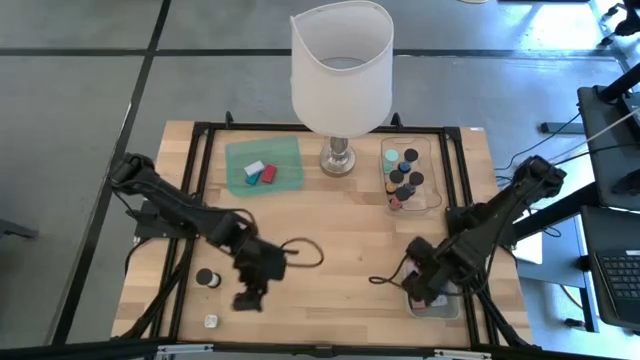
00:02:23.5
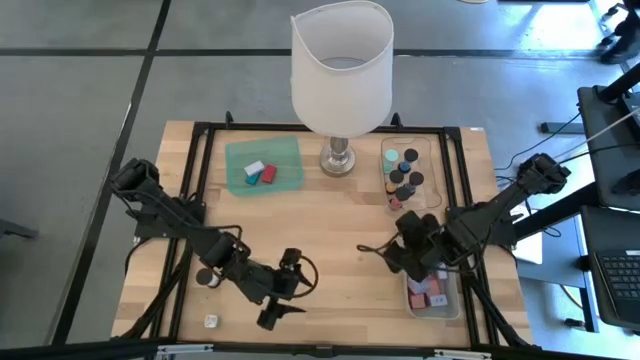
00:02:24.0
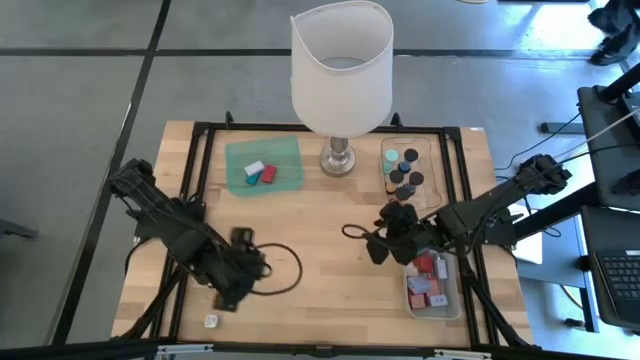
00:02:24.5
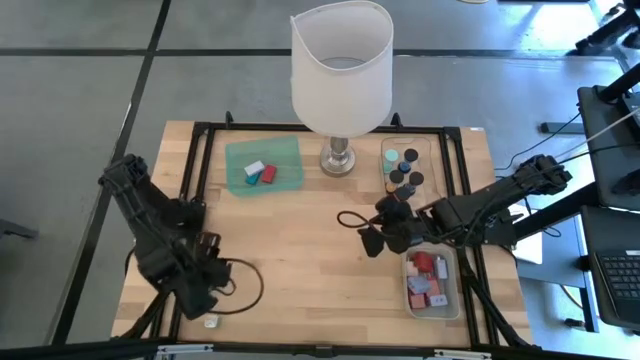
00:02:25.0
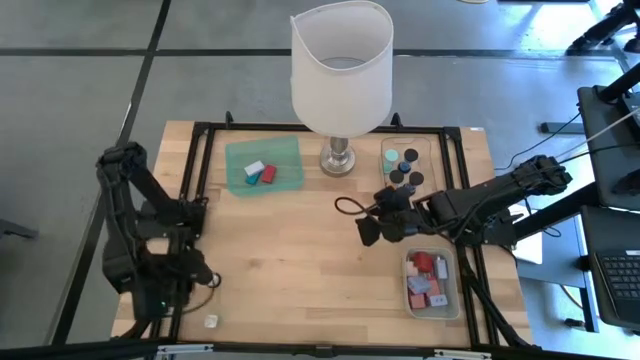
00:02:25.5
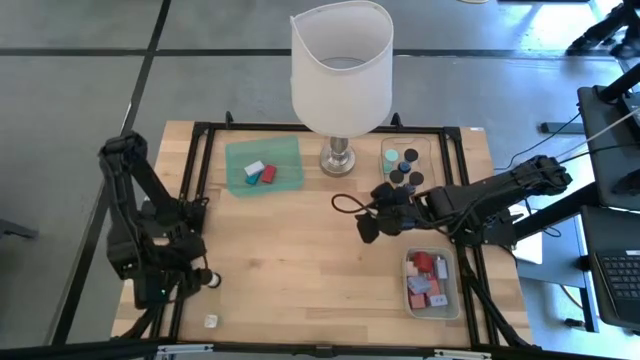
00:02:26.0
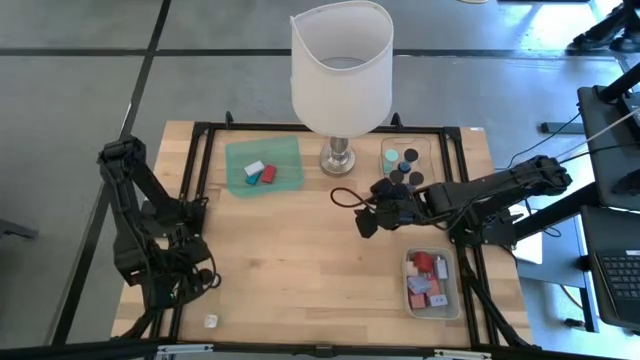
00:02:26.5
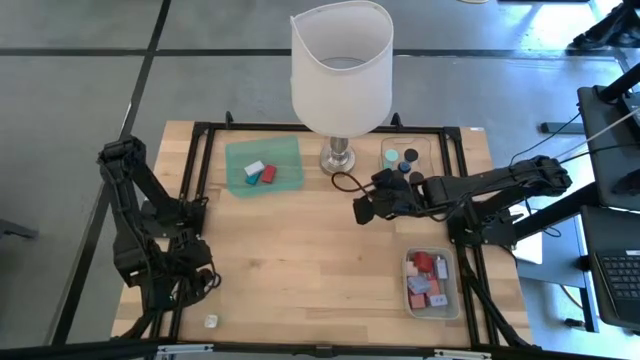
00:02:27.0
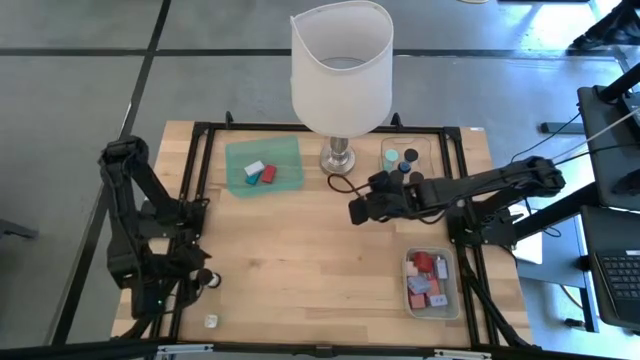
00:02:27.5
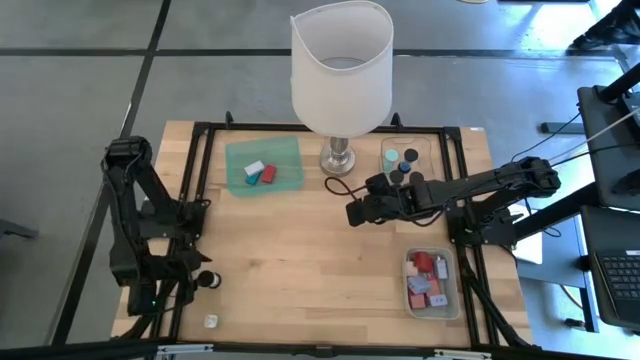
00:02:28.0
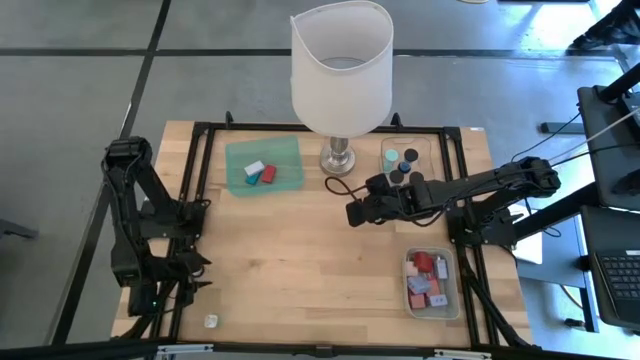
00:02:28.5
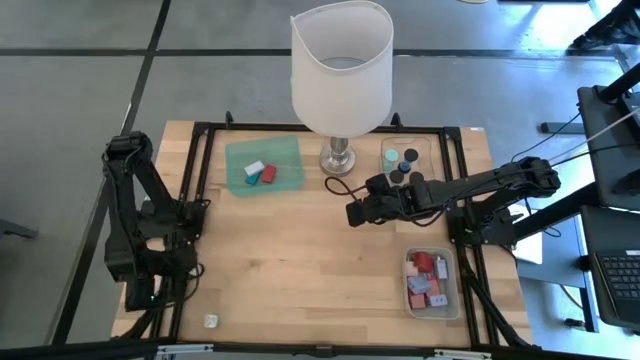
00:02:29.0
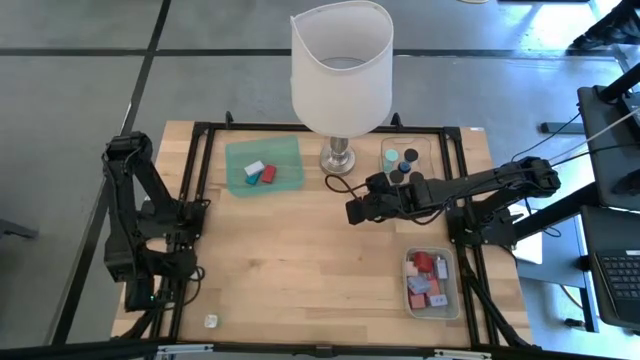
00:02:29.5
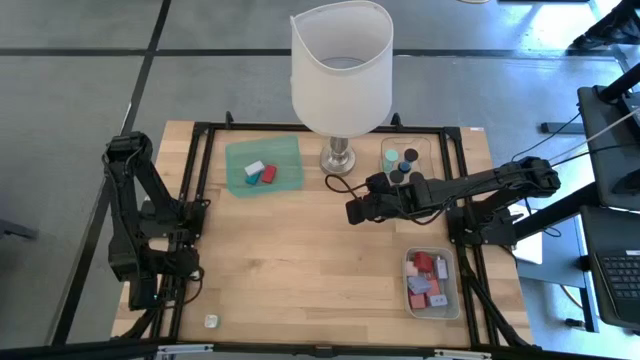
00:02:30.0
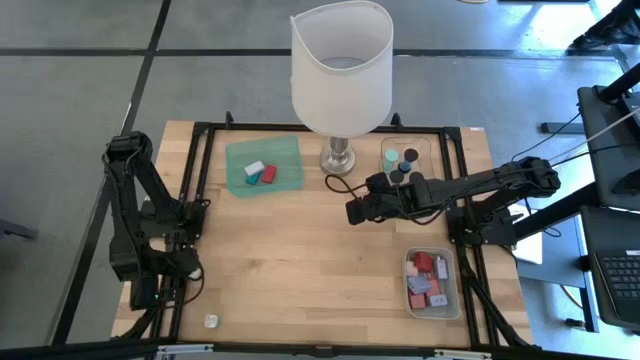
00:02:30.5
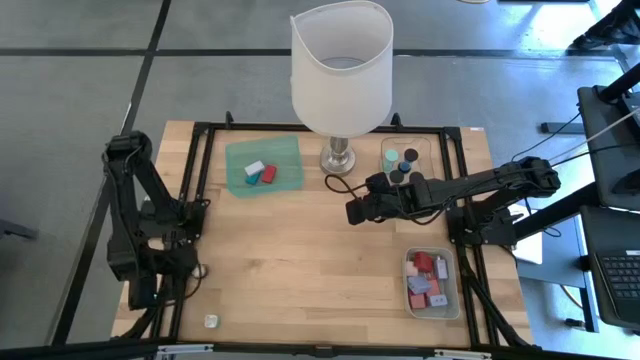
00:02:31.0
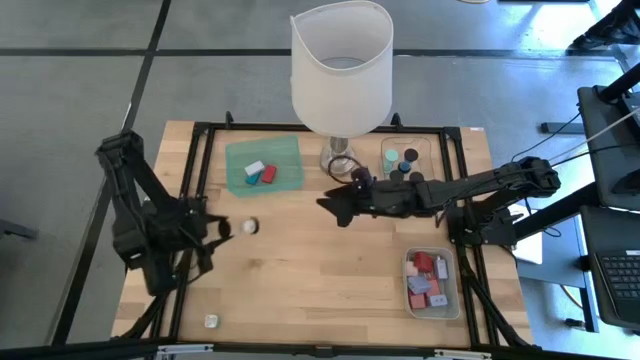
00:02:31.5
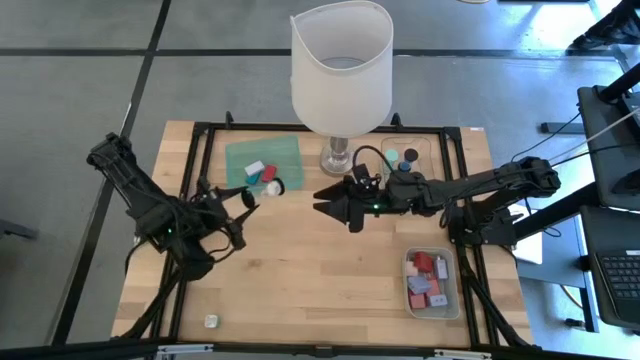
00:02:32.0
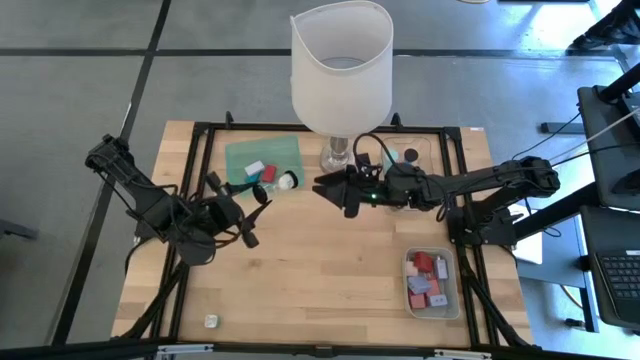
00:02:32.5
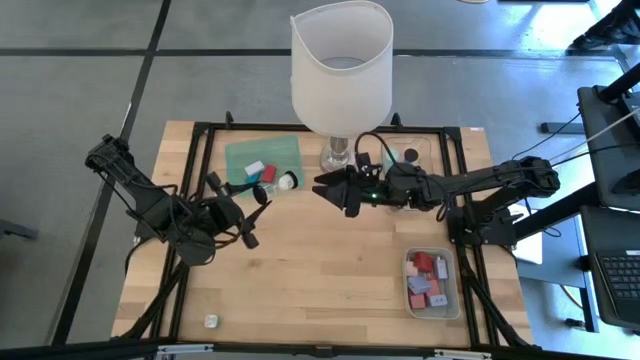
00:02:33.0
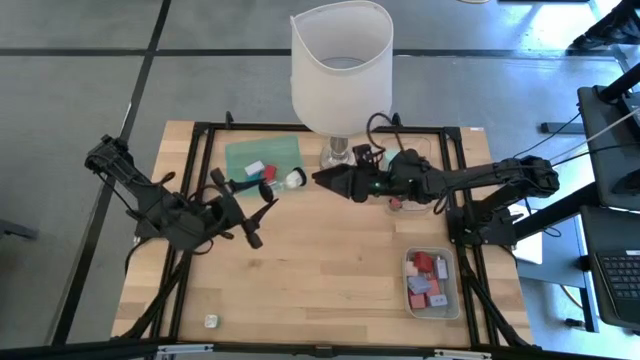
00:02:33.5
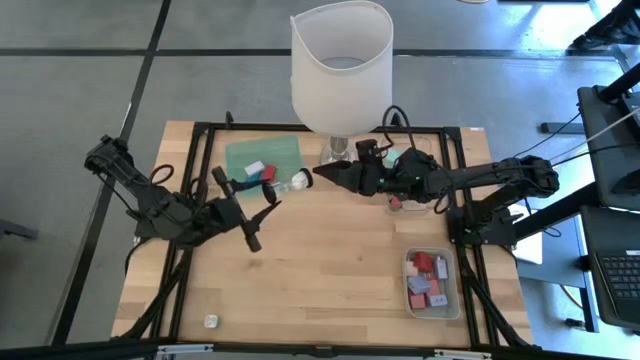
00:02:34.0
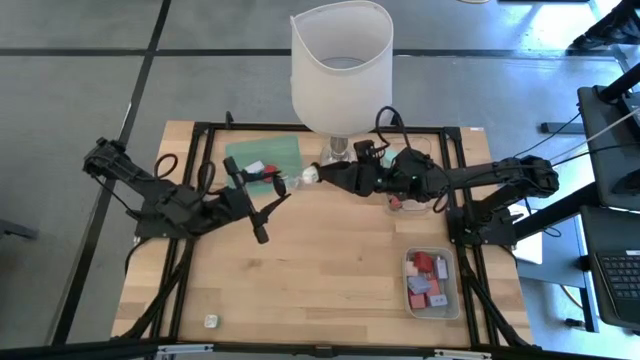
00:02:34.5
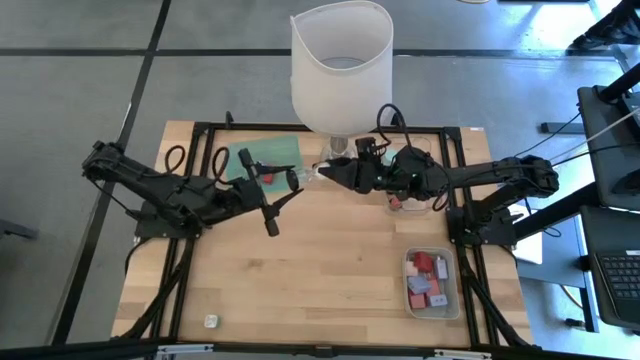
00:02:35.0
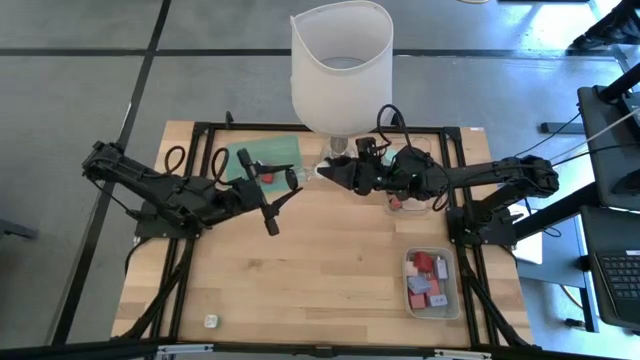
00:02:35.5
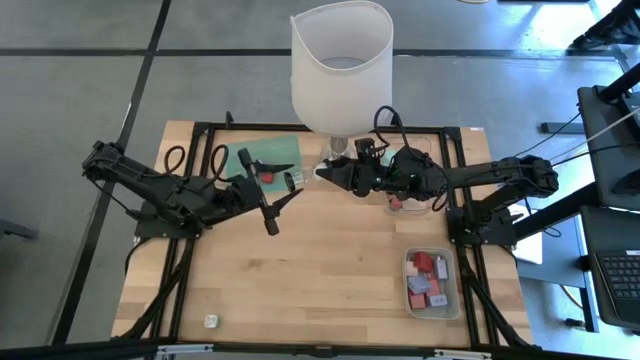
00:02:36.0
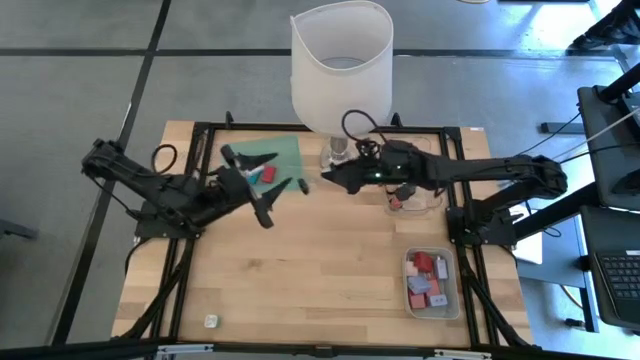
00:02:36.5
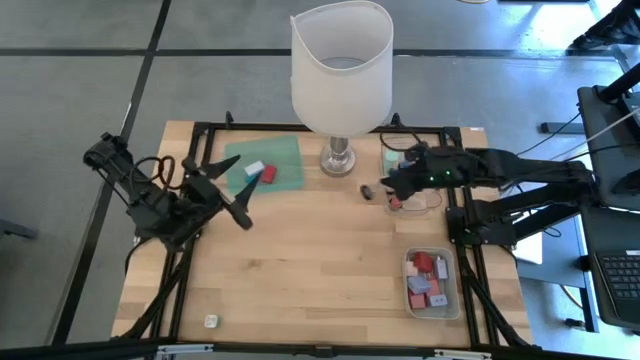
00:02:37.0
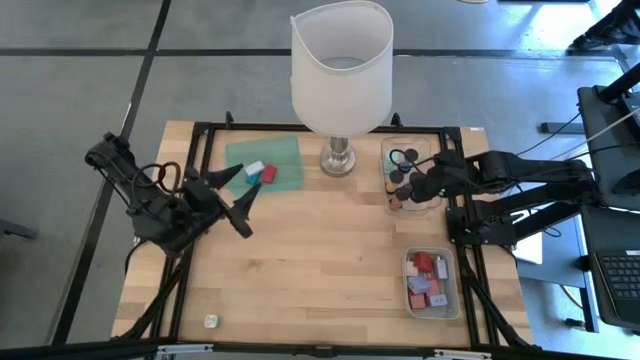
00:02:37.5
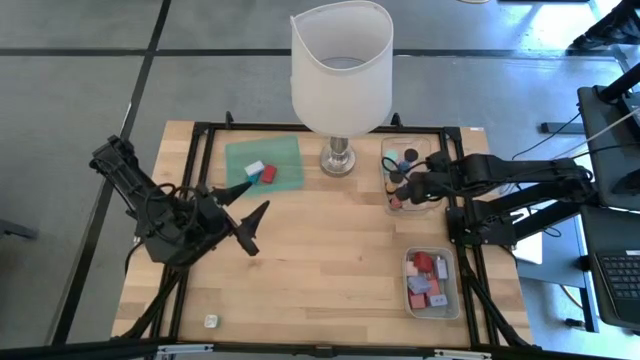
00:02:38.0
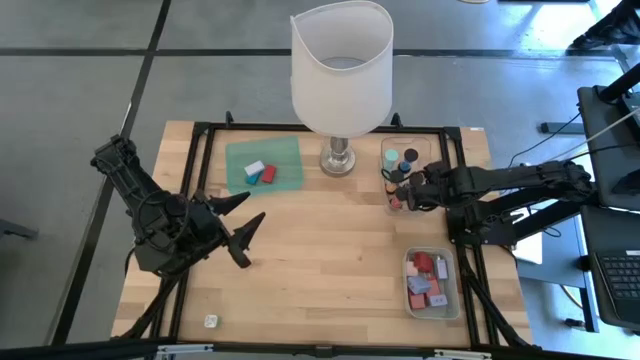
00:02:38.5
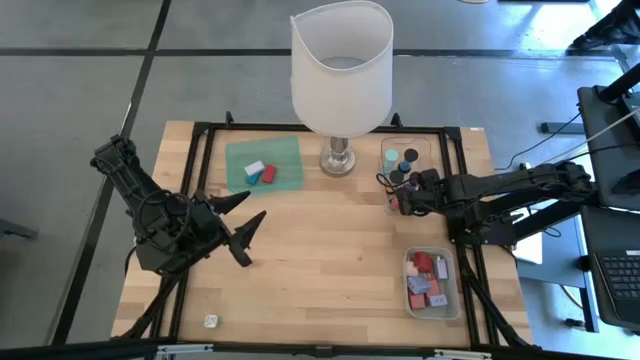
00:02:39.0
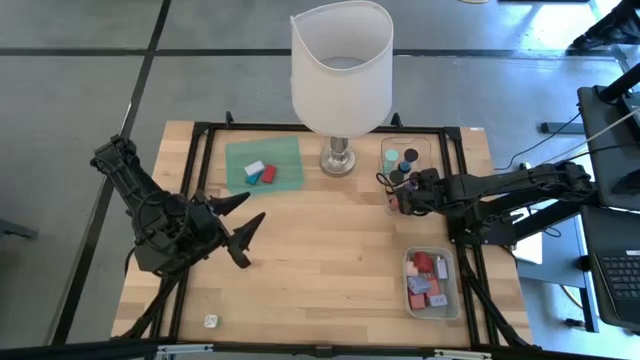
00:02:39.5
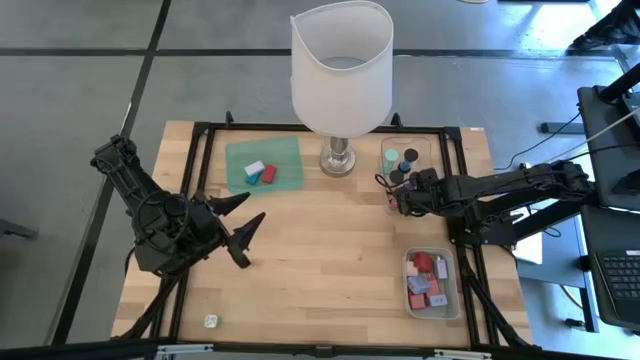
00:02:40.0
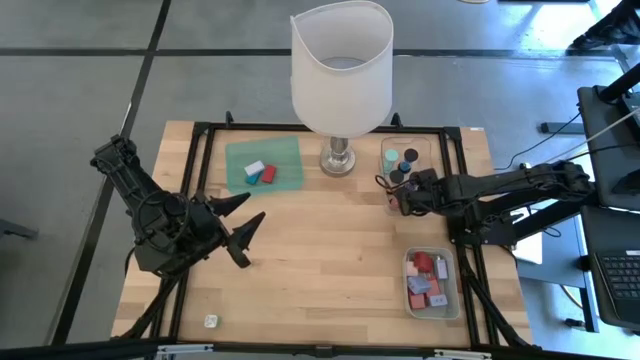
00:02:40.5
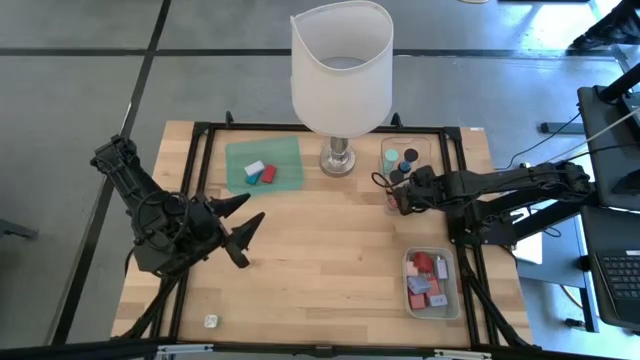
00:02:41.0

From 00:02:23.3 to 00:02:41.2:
Task: Pick & Place Office items
Put the white hourglass into the transparent bin

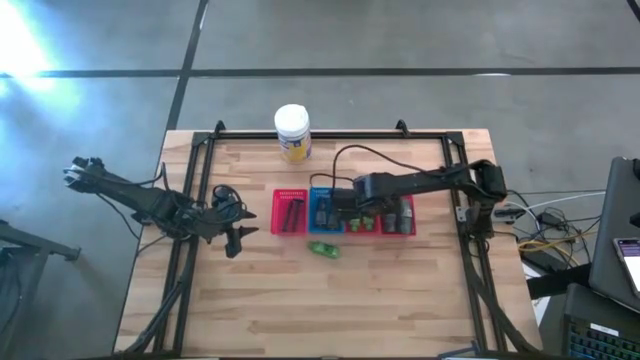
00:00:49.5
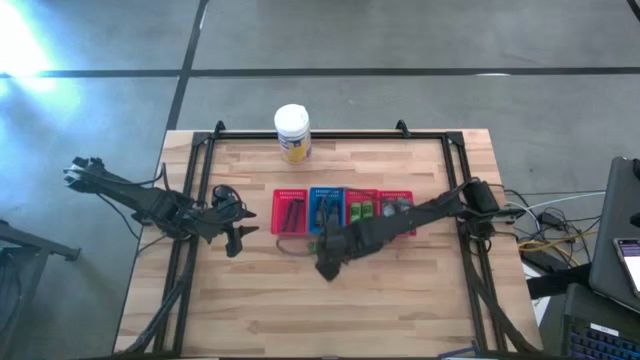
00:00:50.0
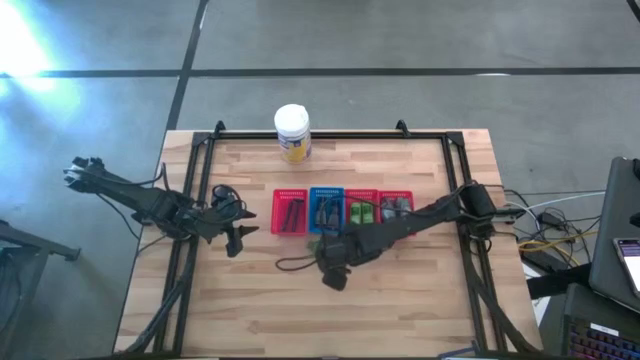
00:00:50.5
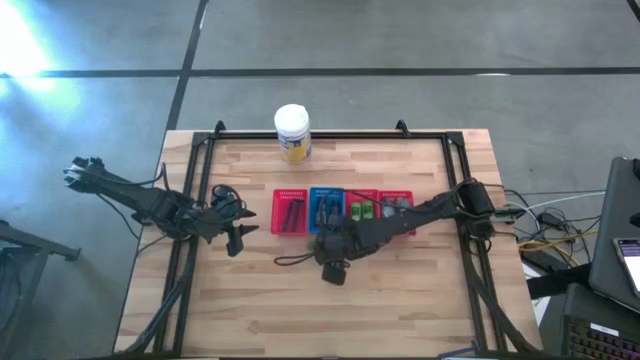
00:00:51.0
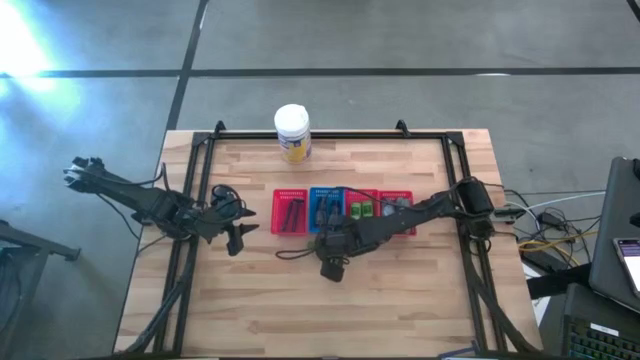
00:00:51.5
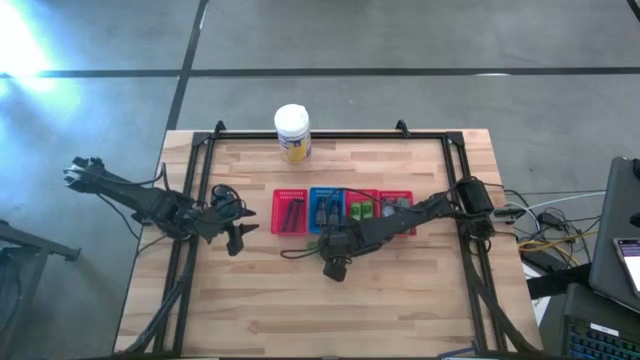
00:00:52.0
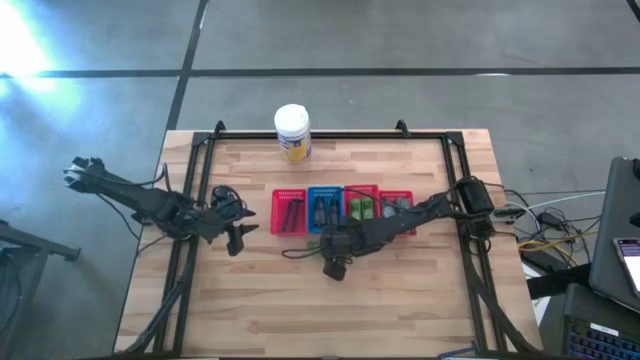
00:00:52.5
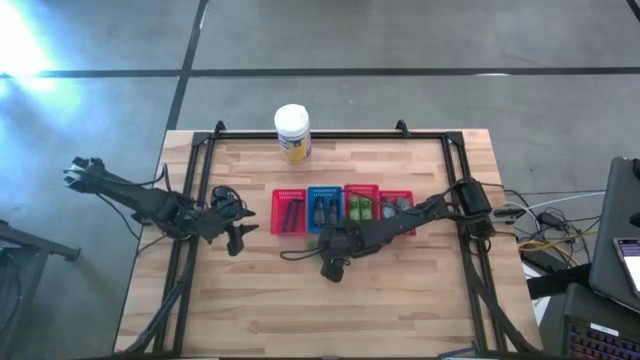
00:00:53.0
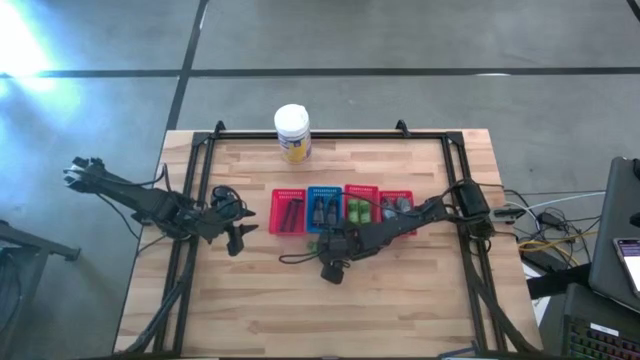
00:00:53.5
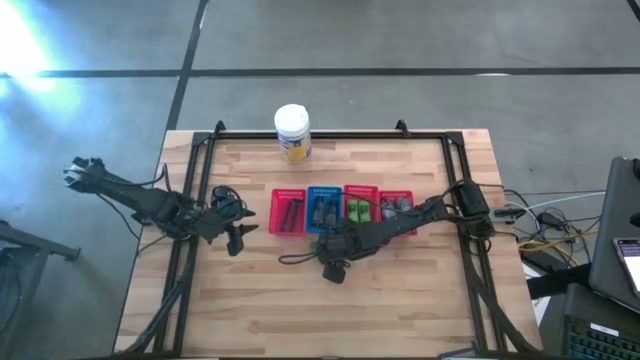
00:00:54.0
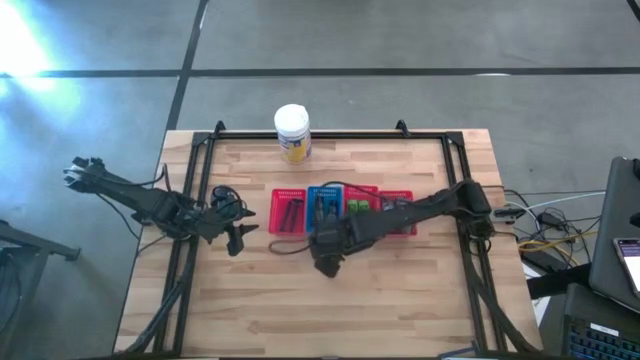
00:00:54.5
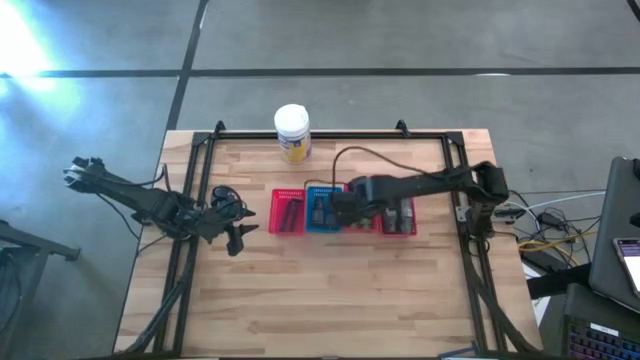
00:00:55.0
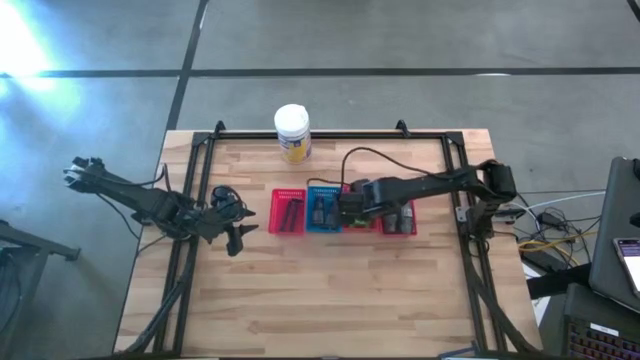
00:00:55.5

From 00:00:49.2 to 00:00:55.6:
Task: Pick & Place Travel size toiletries
Put the shampoo into the middle red bin
